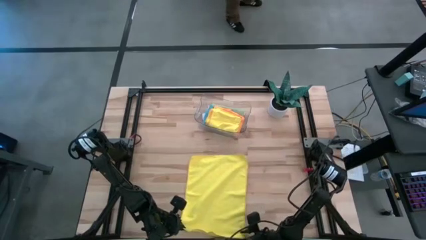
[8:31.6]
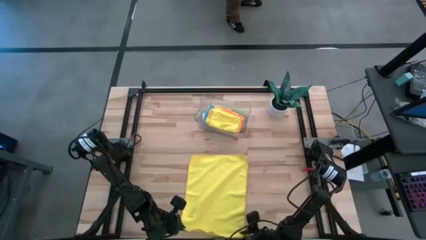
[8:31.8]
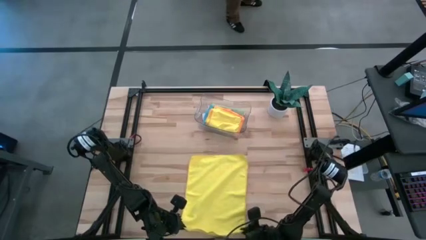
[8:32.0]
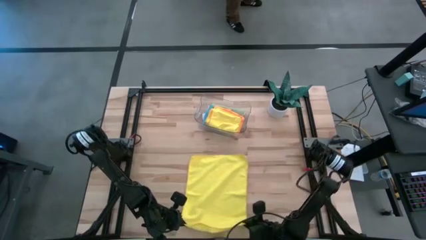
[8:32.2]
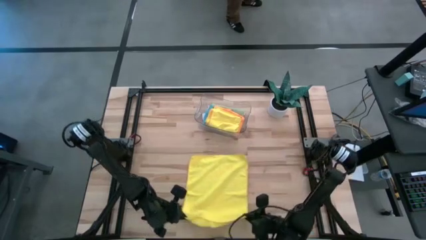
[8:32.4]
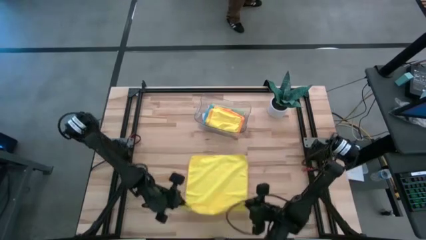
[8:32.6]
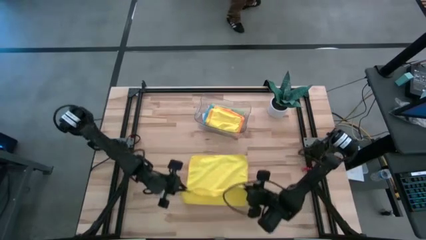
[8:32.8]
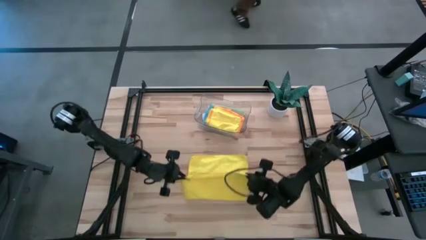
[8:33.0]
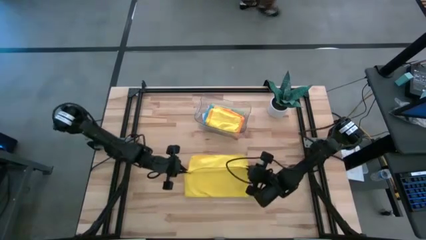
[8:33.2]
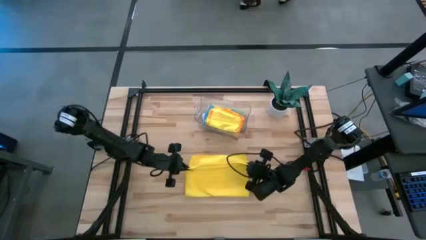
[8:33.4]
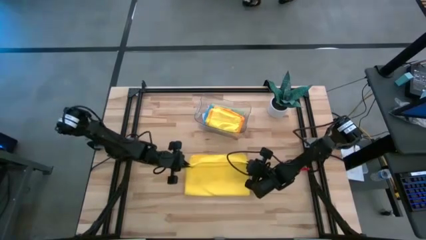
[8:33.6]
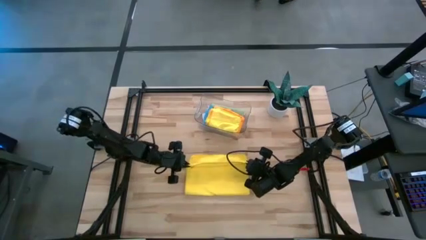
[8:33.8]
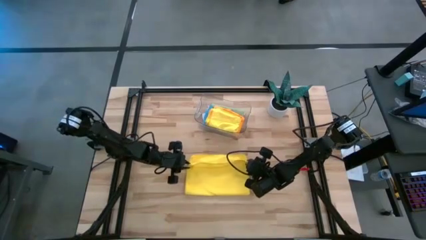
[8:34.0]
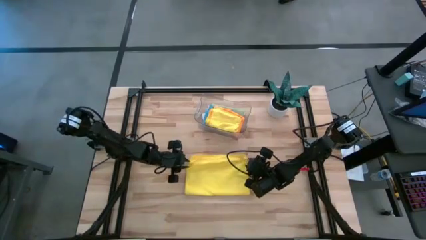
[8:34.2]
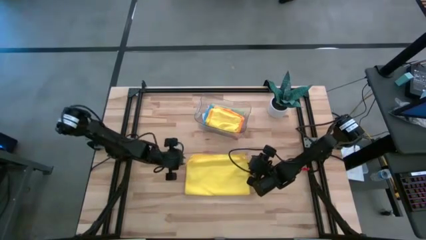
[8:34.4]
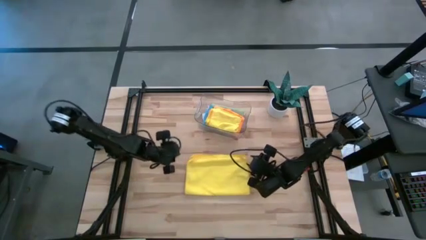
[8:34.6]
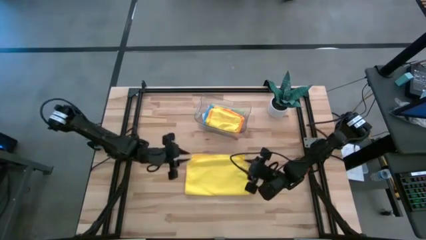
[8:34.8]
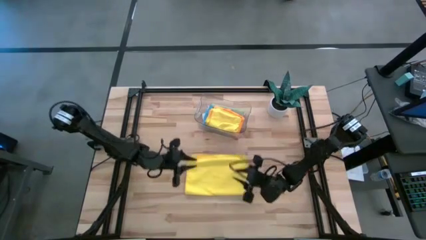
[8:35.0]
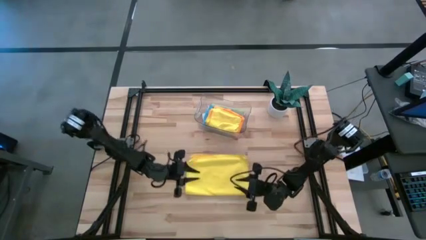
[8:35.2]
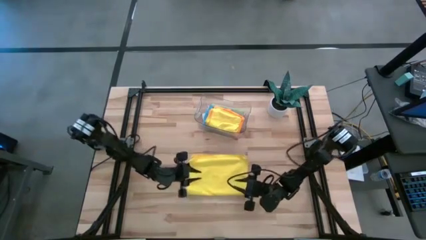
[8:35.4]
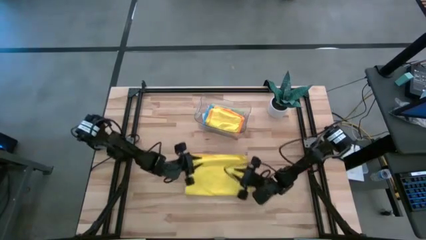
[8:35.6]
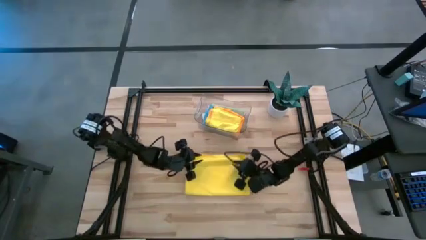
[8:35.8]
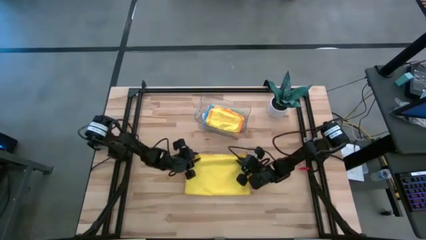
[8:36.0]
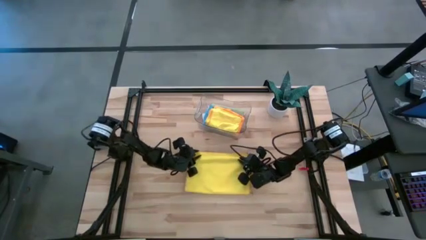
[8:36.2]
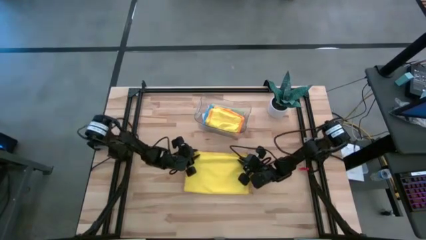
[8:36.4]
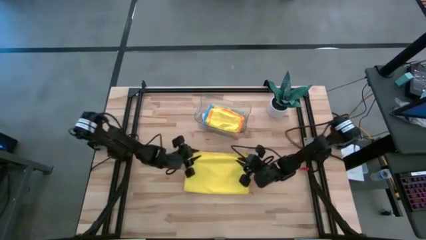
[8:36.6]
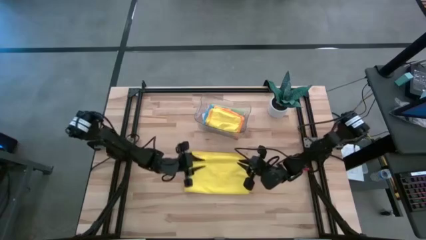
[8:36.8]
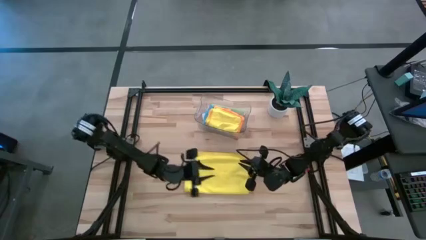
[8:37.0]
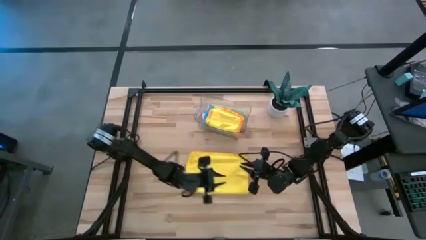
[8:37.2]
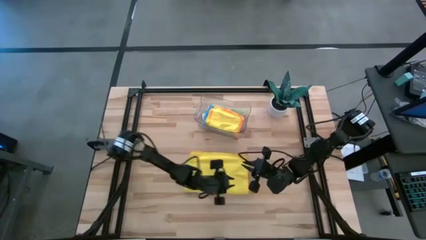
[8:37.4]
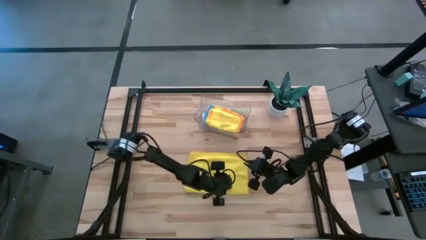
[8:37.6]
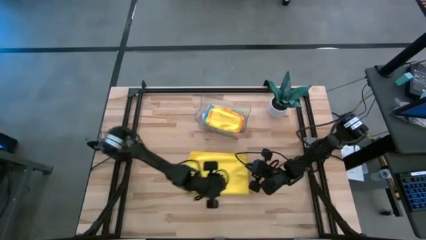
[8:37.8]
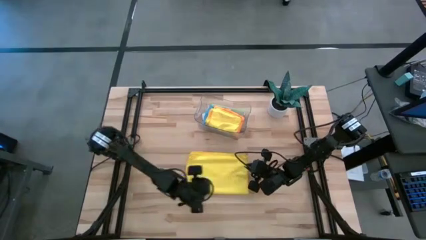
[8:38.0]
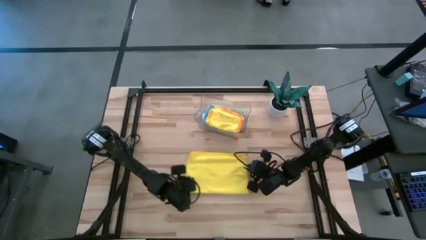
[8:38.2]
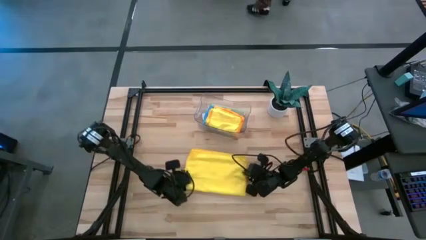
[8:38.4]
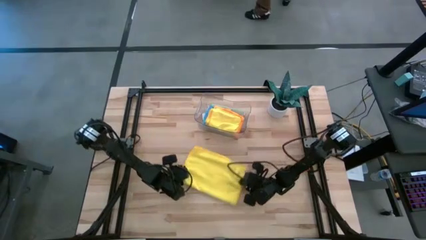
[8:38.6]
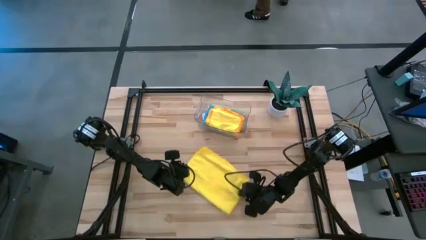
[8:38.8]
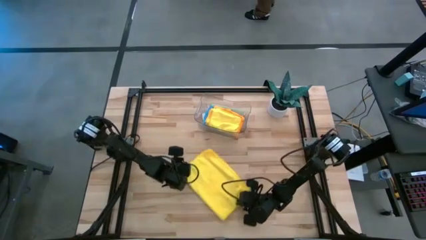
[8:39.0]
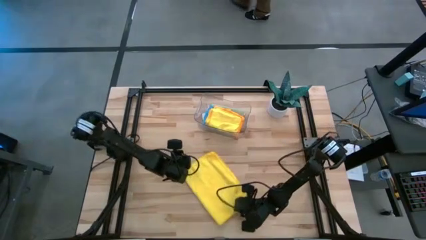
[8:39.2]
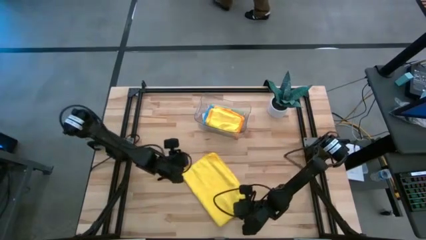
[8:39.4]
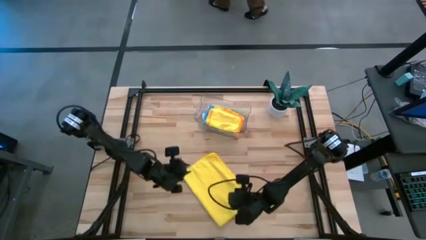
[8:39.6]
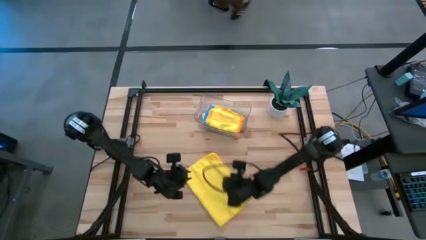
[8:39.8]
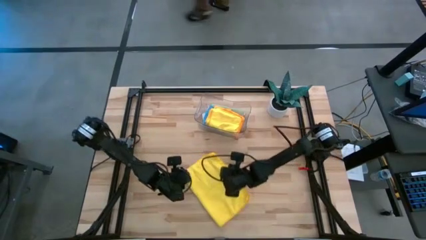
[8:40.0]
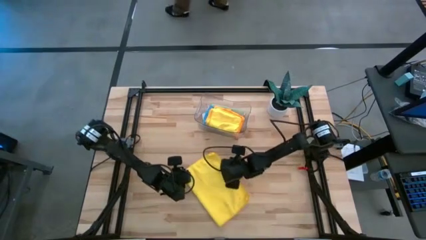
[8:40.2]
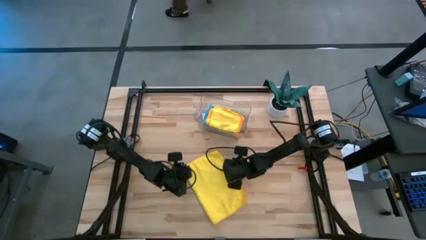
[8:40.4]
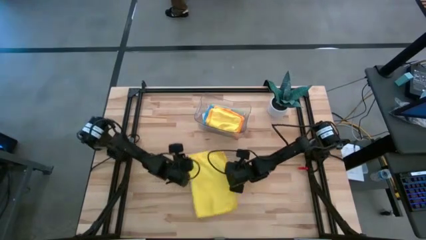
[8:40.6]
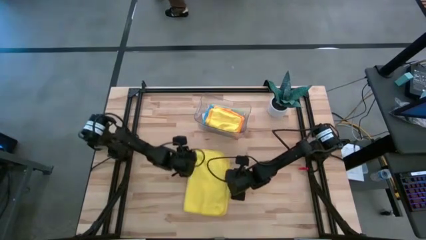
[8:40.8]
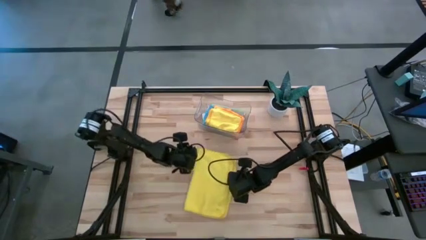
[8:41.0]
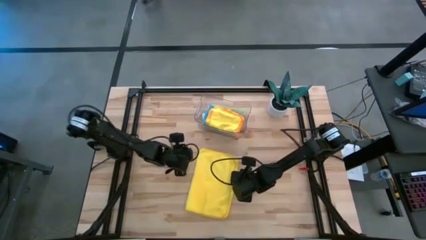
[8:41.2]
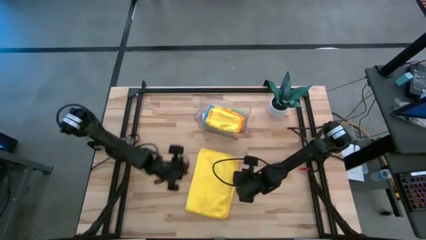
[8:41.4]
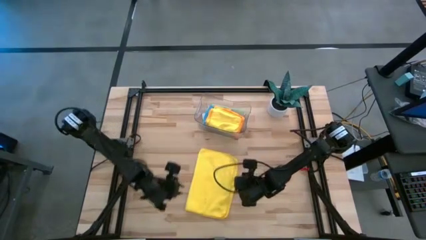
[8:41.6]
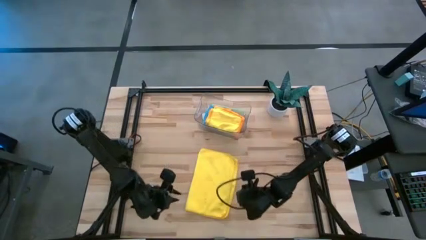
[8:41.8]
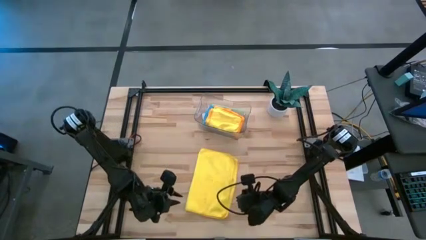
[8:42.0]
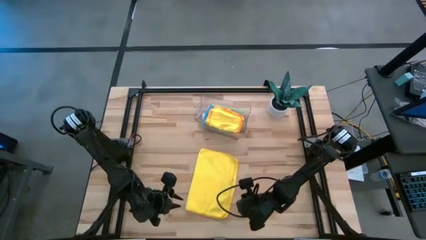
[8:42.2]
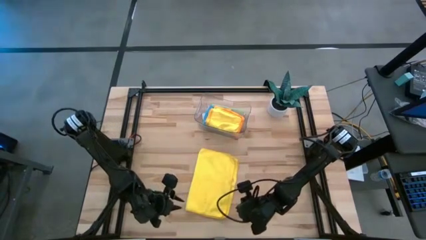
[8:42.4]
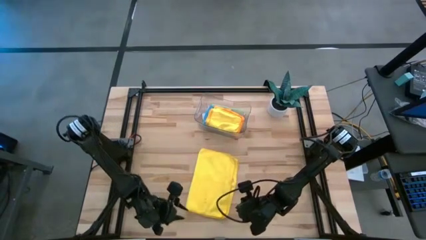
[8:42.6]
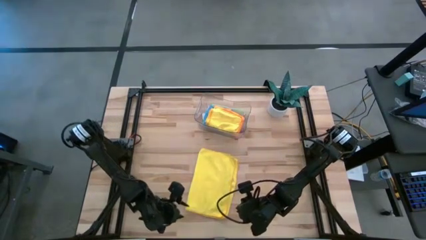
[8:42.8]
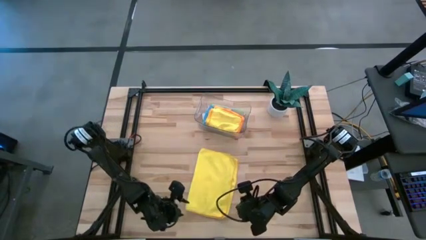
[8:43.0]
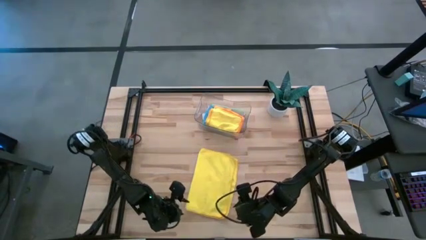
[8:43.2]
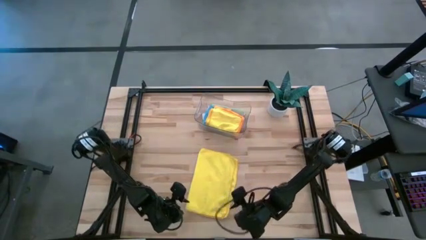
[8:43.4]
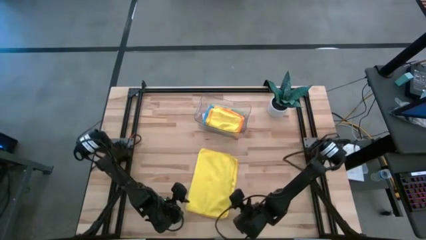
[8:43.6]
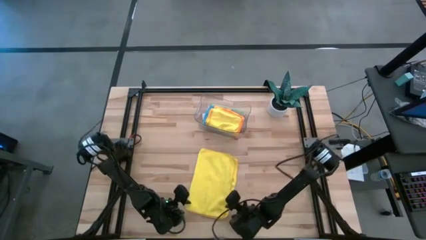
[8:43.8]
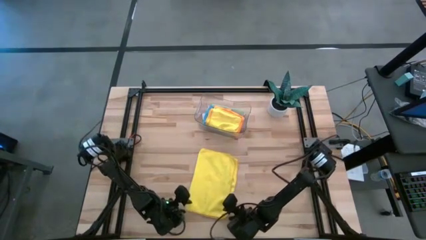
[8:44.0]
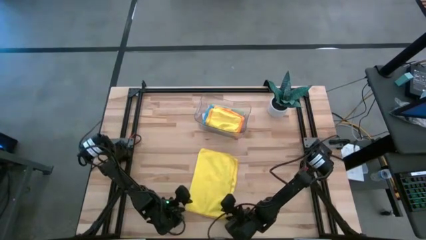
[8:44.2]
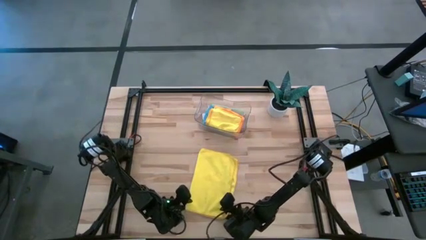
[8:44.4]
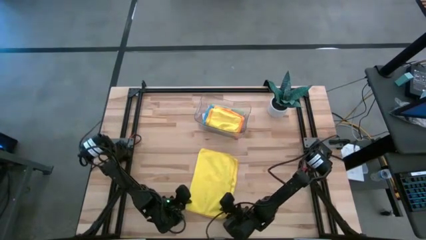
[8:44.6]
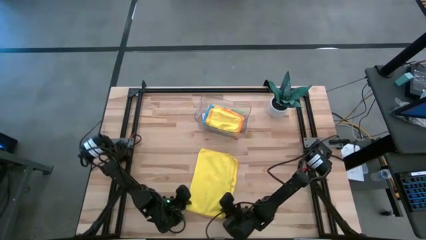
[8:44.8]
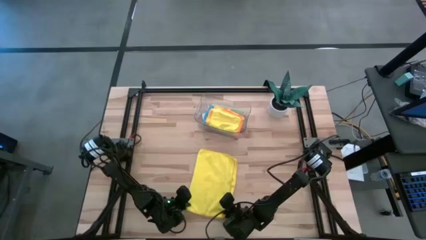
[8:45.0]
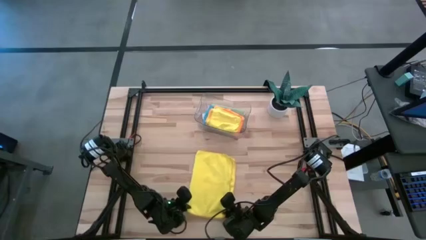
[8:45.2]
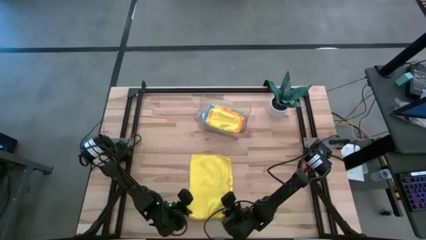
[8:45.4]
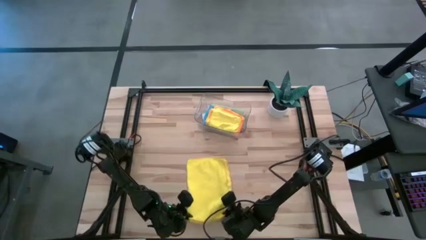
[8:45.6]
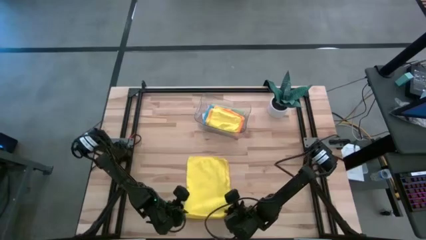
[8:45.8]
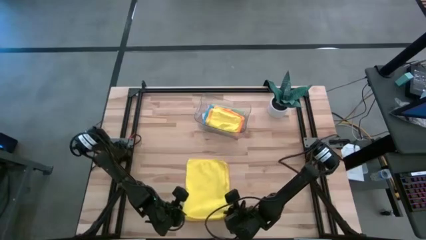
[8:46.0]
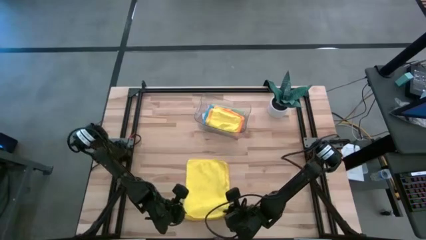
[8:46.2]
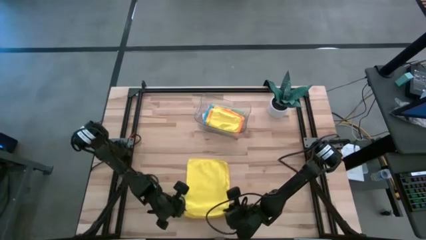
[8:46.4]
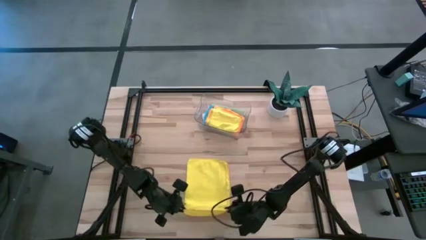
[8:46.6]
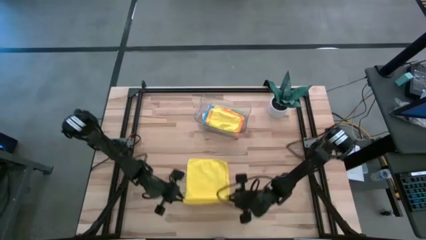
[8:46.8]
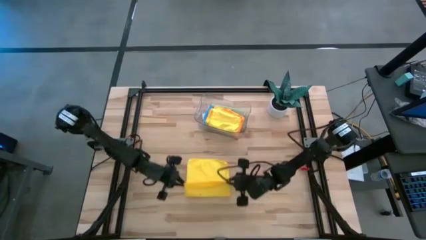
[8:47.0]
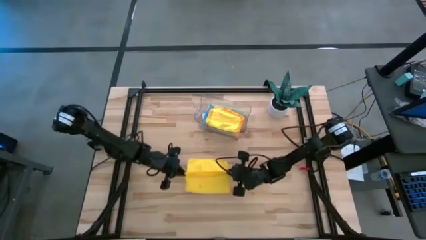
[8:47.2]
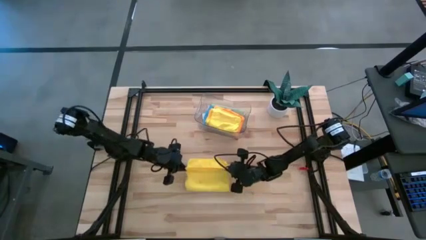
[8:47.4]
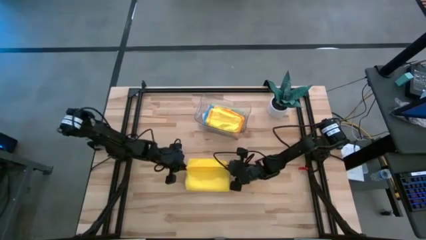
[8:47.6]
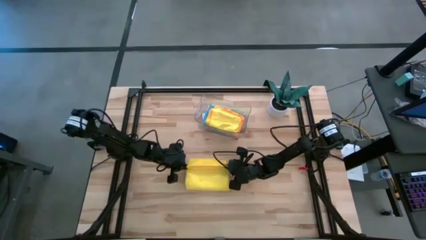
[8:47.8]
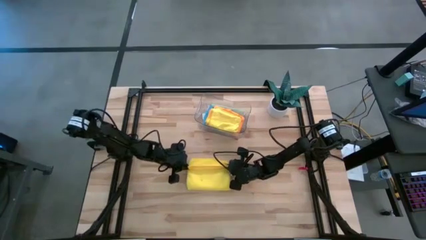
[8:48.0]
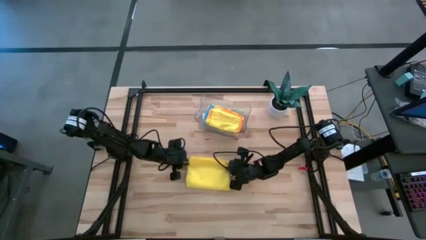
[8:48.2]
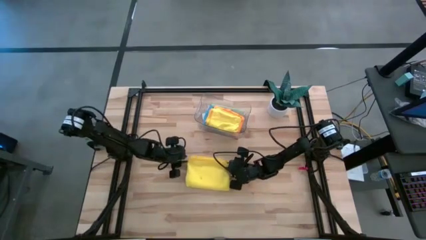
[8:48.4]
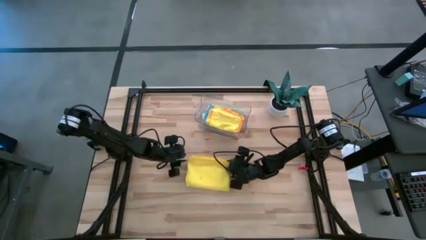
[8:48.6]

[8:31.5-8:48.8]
Task: Fold microfiber towels
Fold the yellow towel
